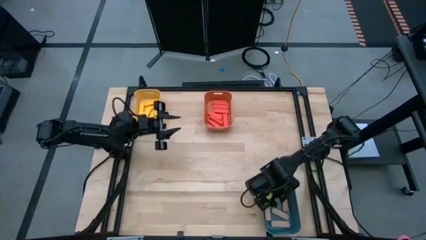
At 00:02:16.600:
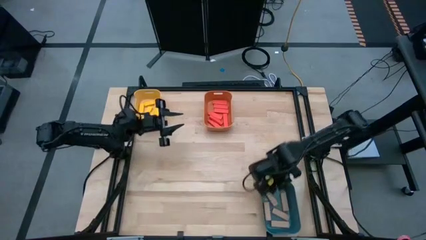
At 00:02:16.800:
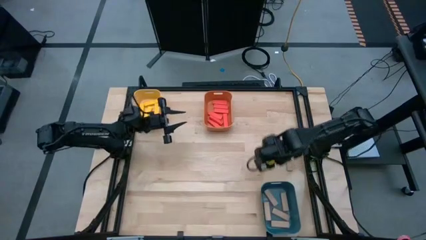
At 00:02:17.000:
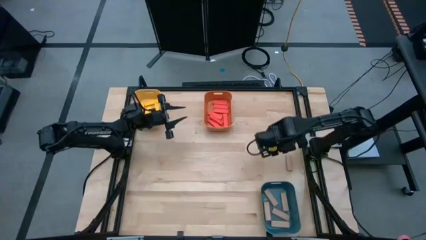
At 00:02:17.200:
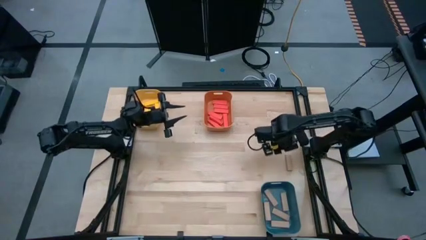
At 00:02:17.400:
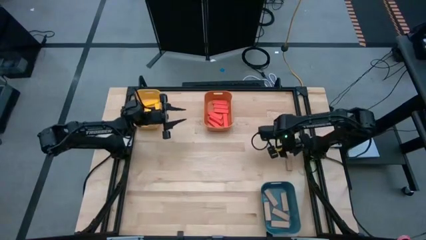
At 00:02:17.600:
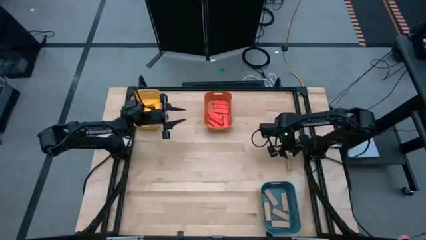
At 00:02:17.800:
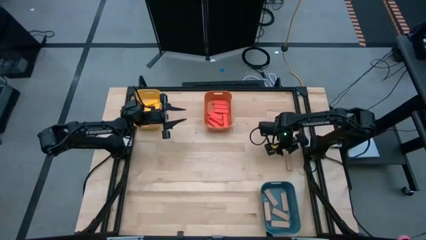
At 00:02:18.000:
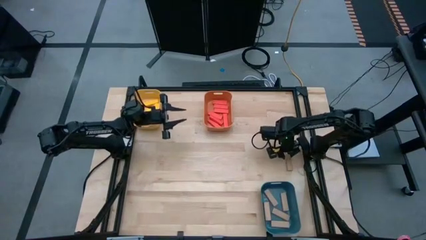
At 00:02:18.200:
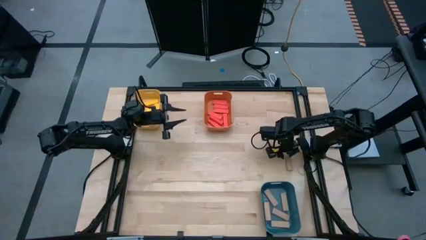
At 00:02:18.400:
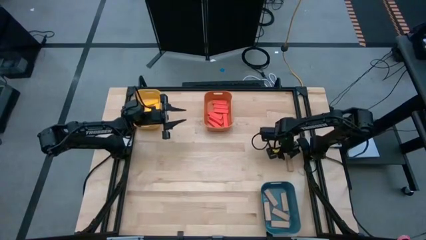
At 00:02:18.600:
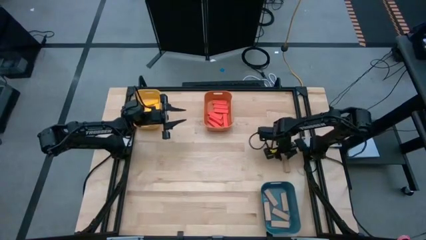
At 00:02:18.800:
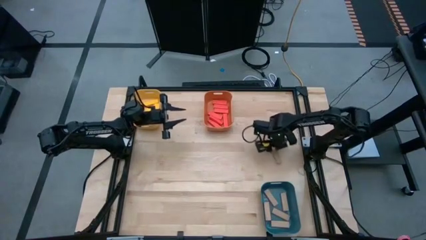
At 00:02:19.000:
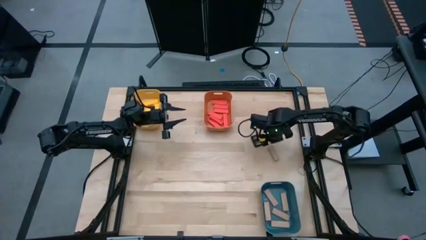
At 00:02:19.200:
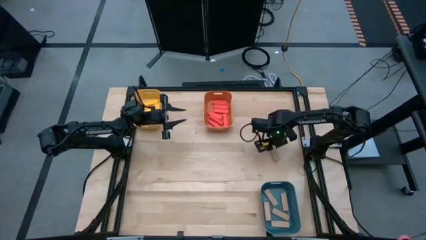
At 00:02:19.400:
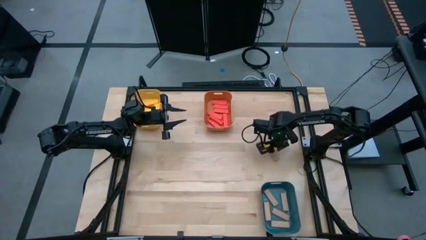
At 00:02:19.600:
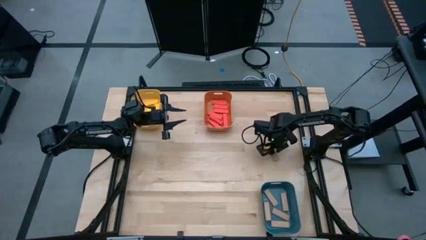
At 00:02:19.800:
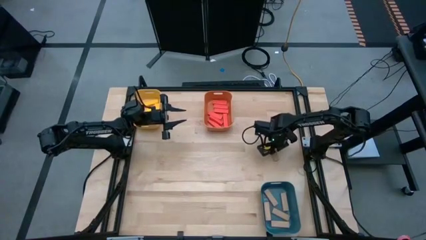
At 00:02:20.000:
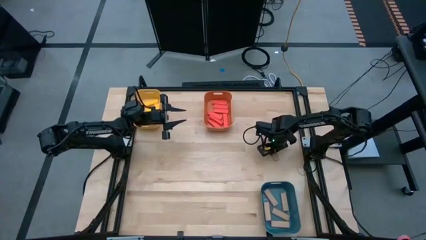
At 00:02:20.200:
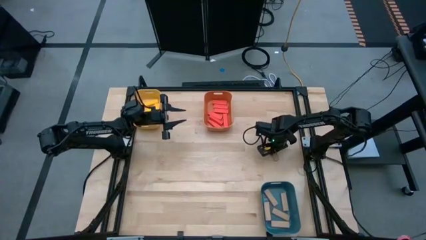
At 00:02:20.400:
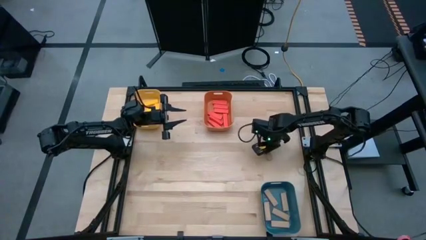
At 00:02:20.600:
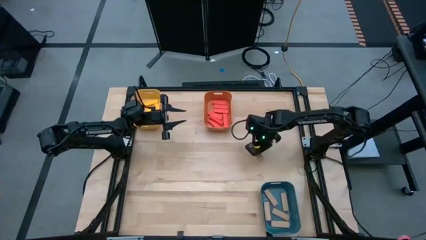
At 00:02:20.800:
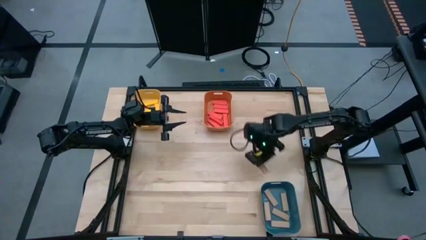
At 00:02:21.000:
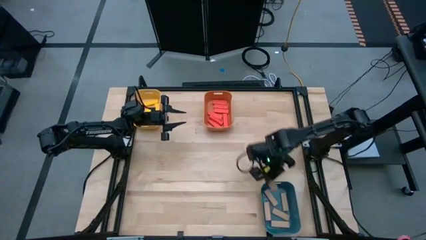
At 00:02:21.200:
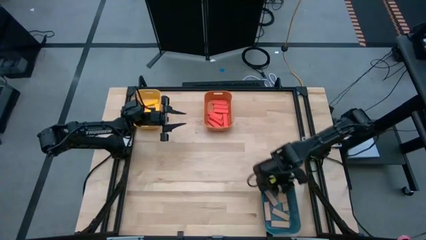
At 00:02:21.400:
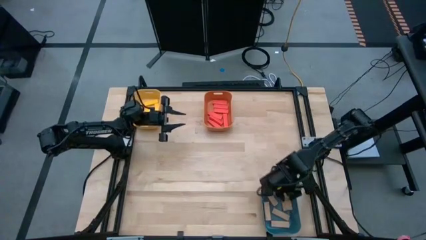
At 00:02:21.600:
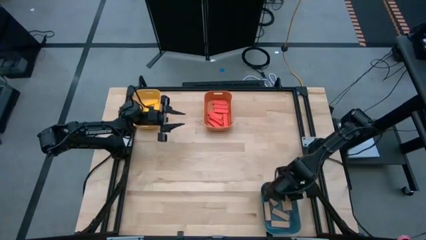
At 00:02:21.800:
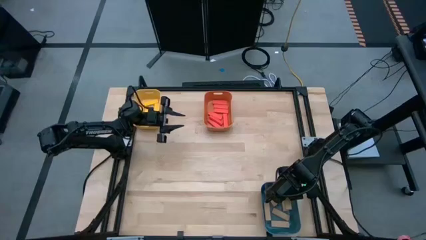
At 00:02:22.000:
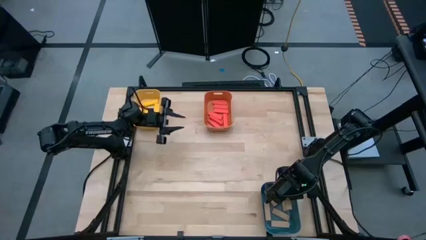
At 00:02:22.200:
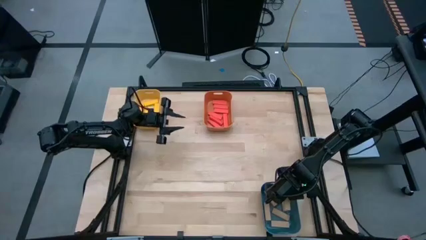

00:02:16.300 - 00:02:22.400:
Task: Sort blocks
Put the brown block into the blue bin

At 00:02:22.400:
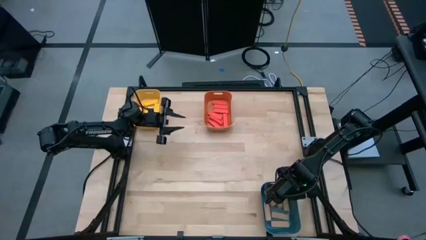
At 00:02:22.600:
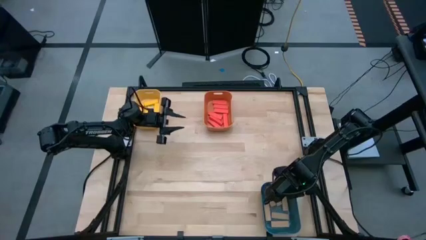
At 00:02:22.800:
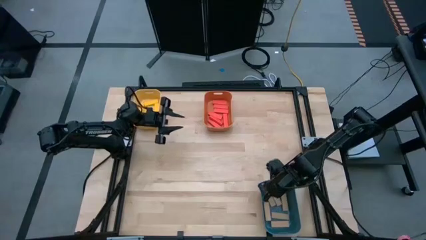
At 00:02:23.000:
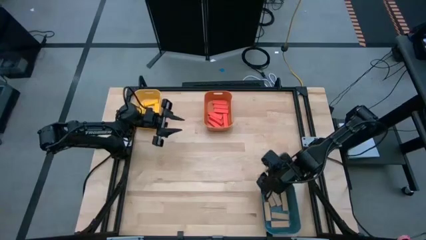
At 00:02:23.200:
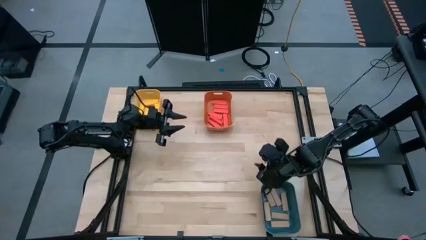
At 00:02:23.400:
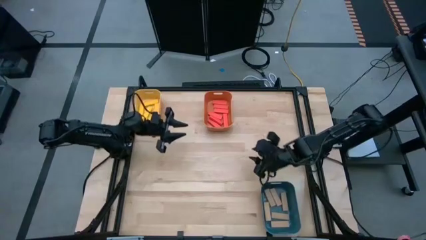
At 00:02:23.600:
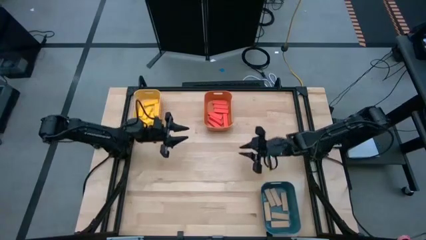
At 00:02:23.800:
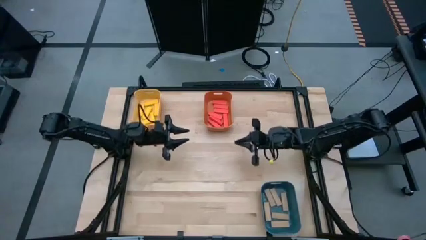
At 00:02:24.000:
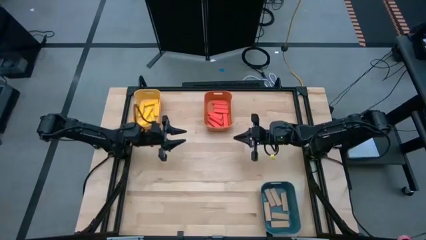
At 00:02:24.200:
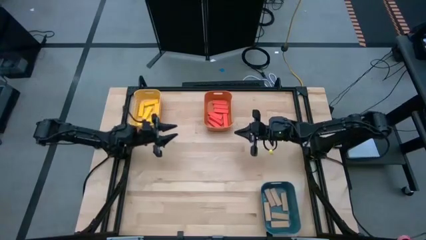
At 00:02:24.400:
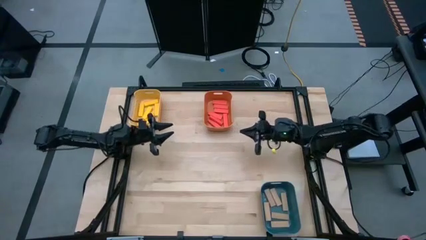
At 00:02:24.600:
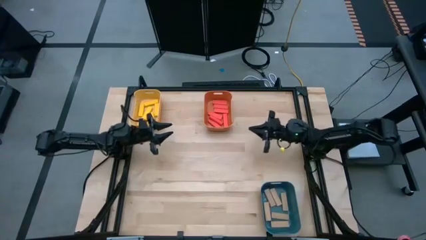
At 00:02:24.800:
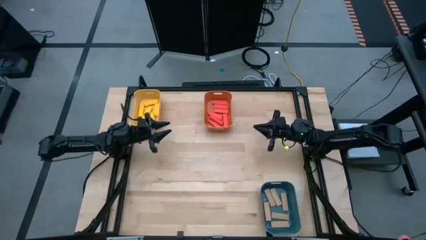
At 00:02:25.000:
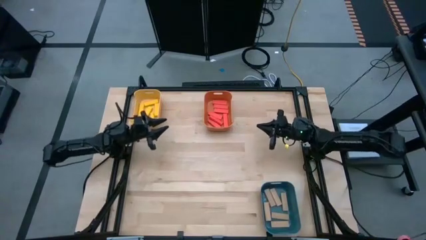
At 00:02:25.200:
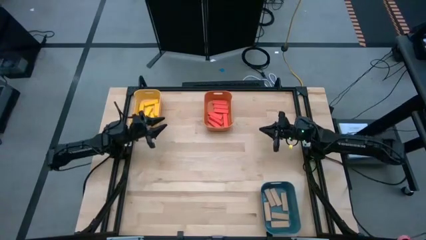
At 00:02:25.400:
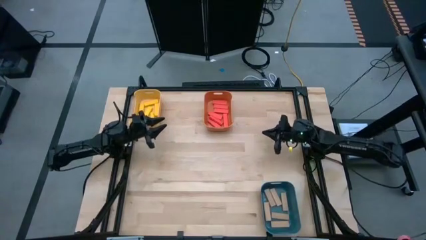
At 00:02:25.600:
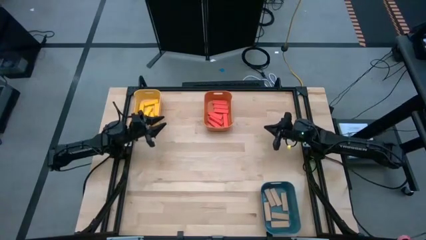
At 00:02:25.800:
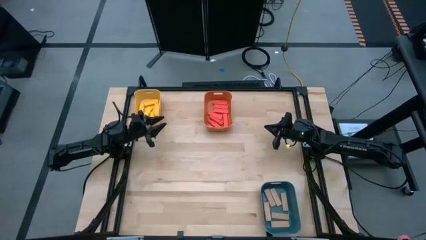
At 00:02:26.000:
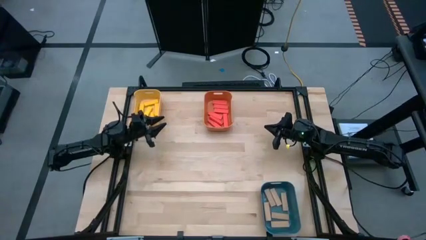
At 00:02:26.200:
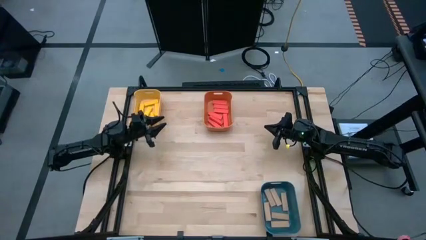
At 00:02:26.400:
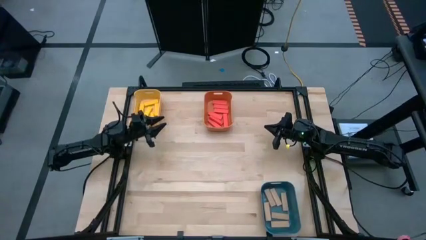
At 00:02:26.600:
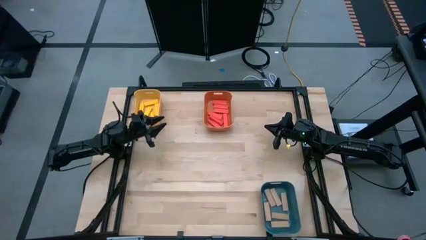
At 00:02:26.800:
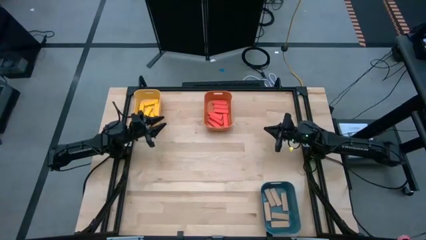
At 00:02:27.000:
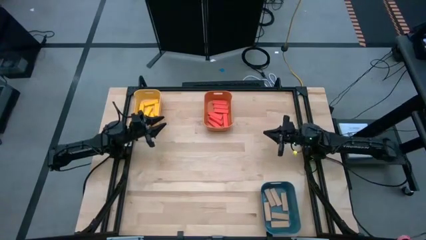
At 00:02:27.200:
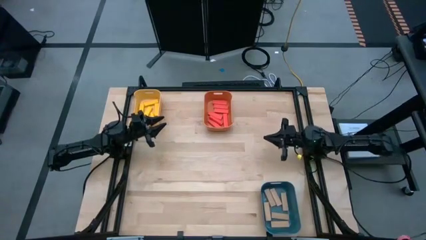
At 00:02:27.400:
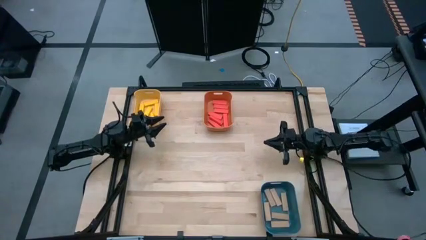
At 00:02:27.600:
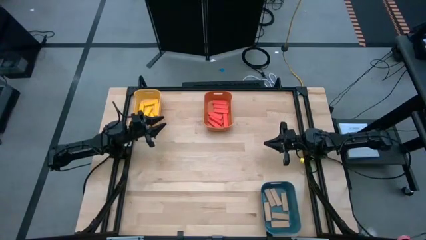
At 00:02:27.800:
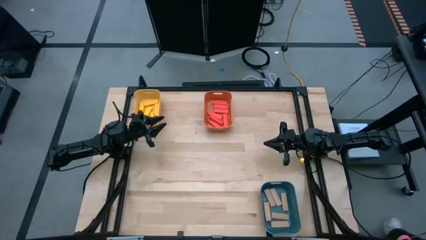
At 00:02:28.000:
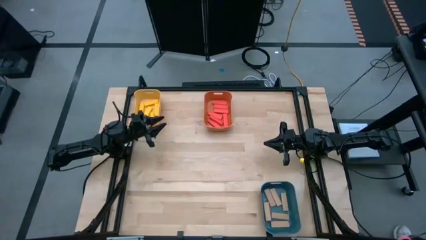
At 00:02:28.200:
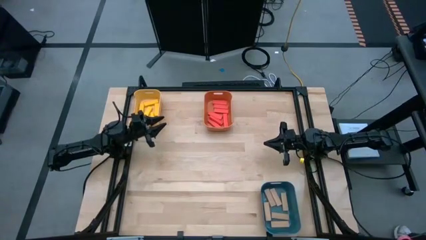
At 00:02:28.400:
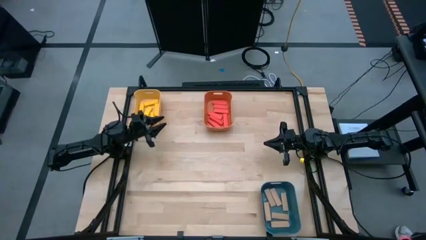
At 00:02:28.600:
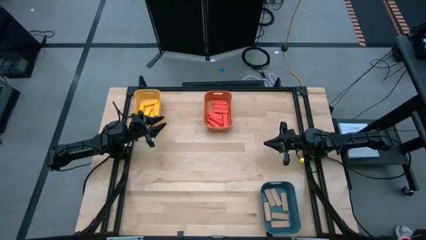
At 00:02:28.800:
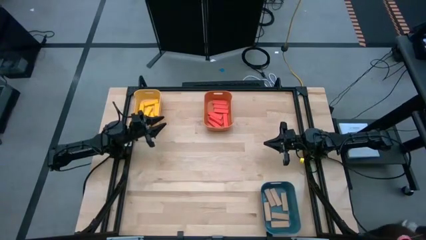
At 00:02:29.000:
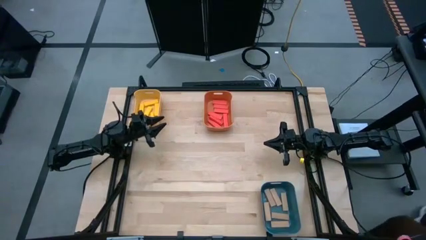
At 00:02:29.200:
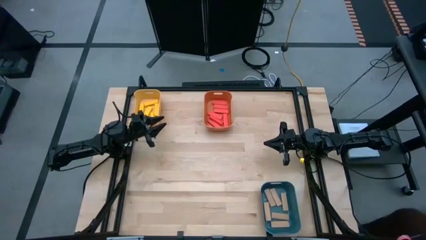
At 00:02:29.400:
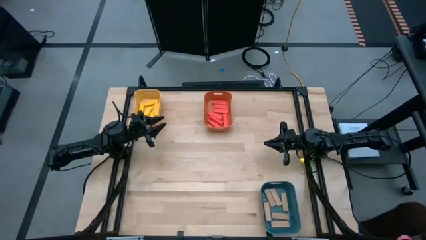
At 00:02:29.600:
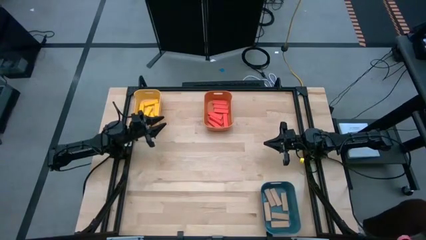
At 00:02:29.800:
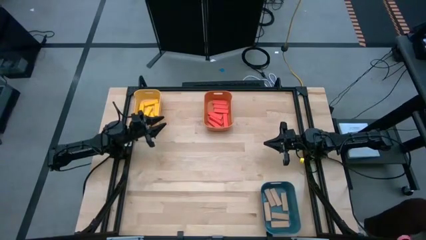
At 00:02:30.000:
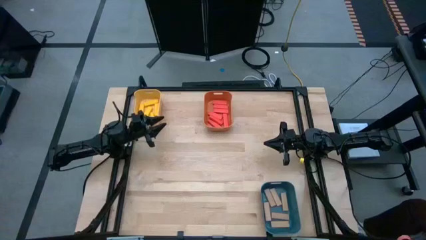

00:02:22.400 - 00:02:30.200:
Return to Home Position
